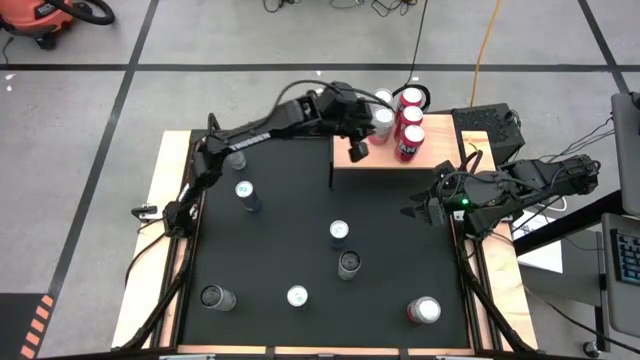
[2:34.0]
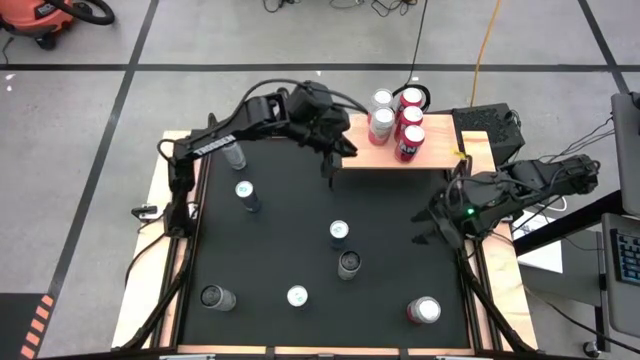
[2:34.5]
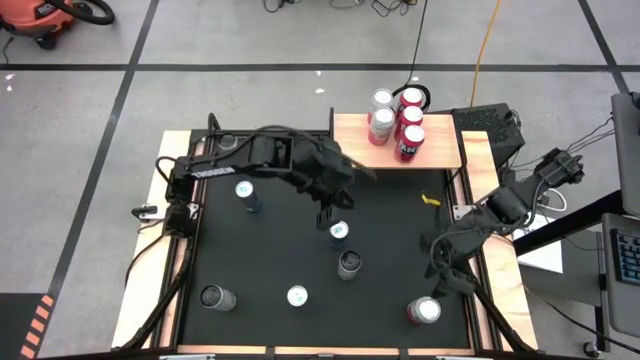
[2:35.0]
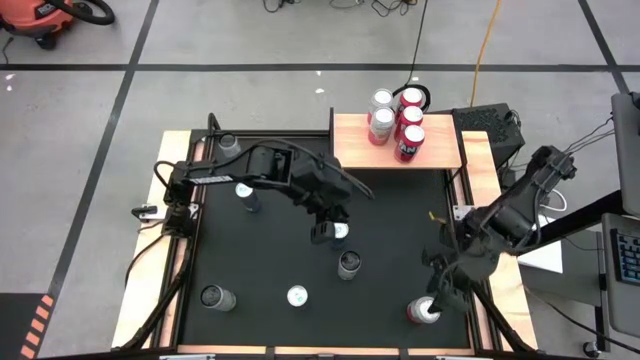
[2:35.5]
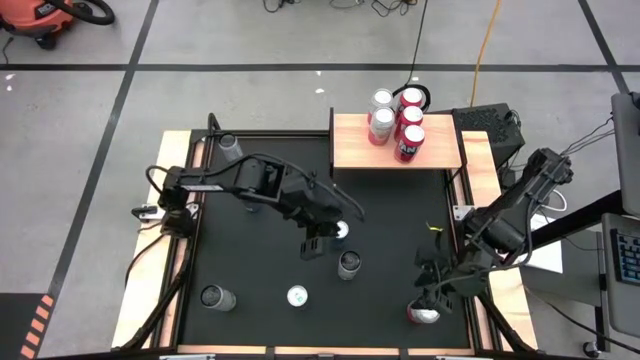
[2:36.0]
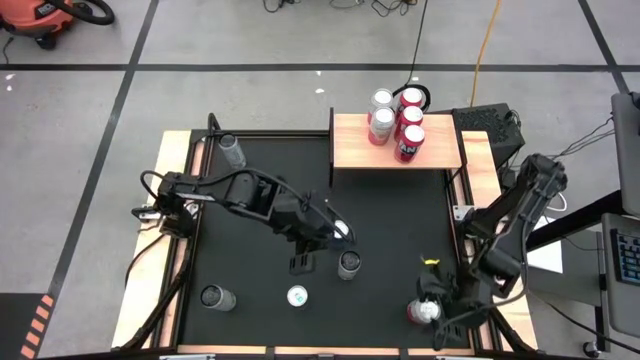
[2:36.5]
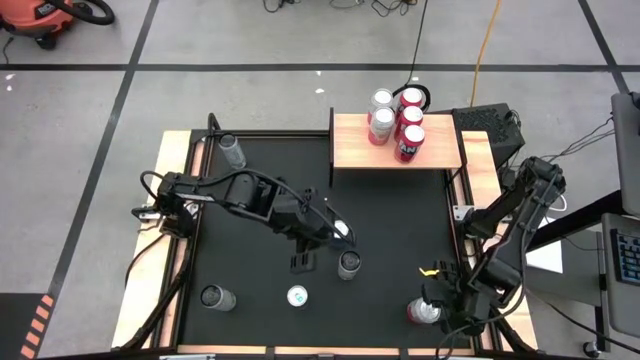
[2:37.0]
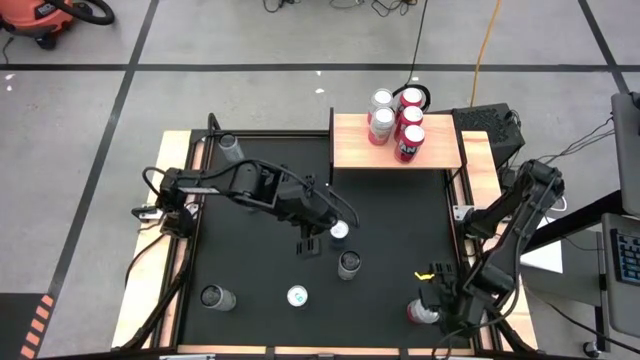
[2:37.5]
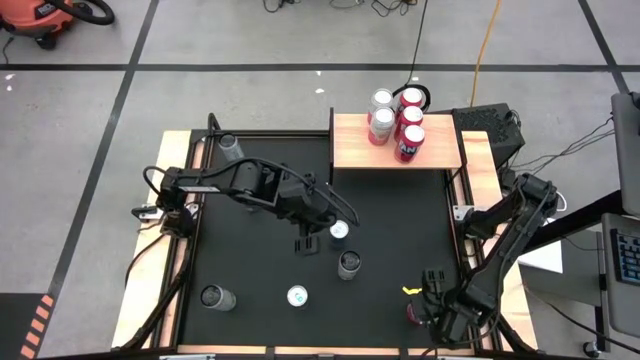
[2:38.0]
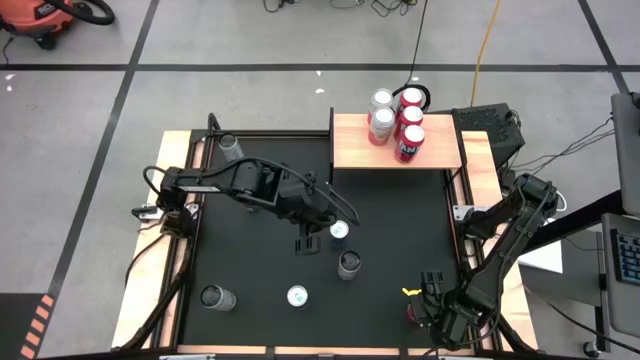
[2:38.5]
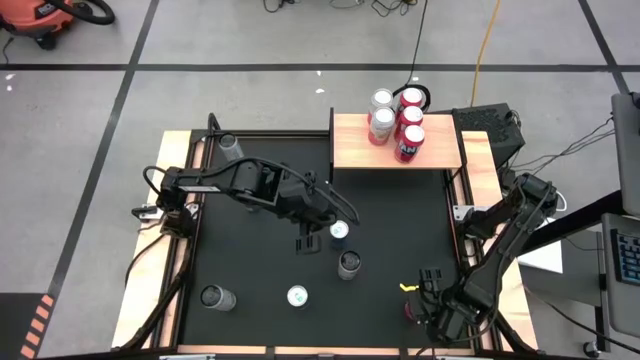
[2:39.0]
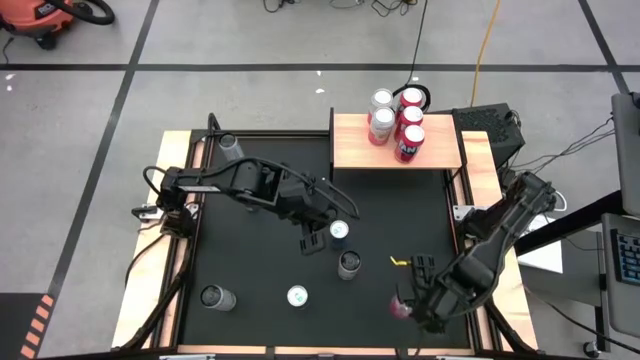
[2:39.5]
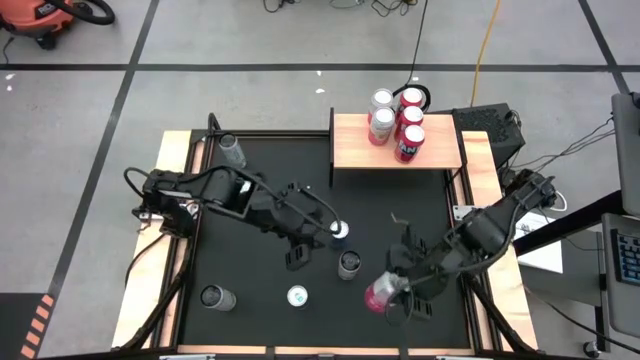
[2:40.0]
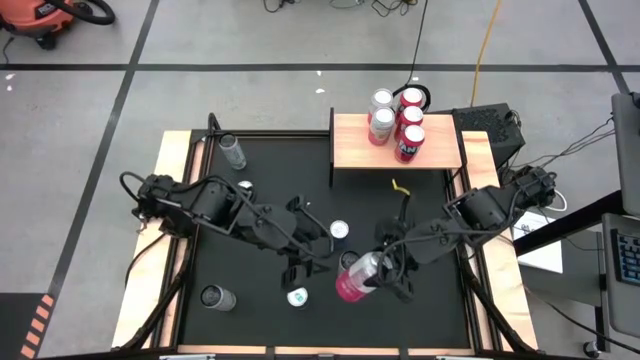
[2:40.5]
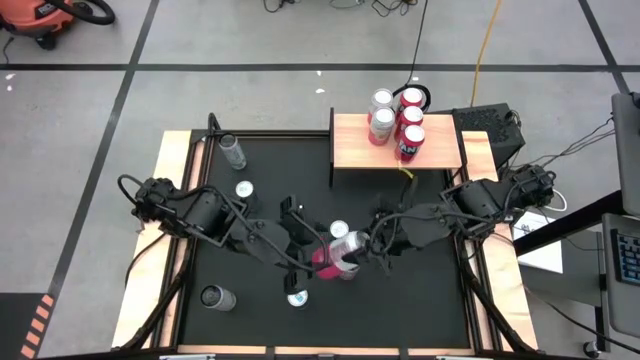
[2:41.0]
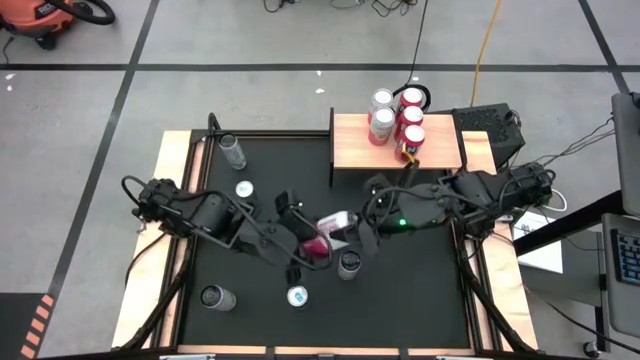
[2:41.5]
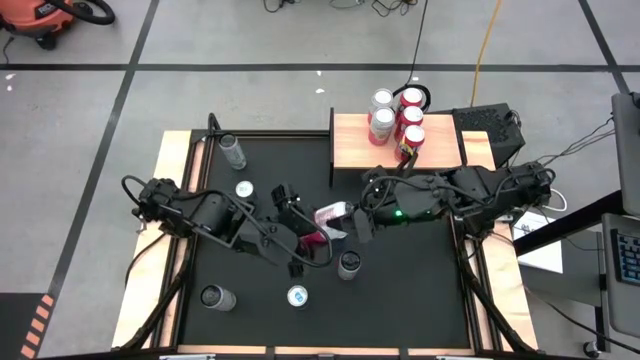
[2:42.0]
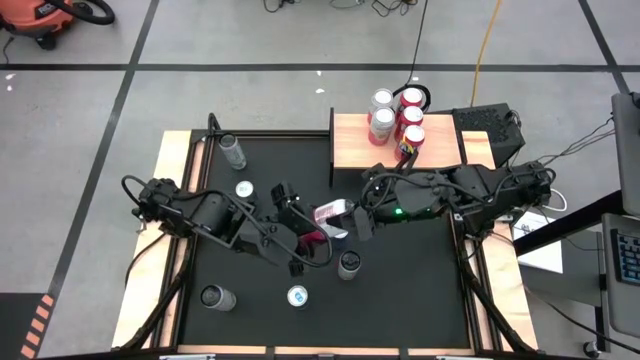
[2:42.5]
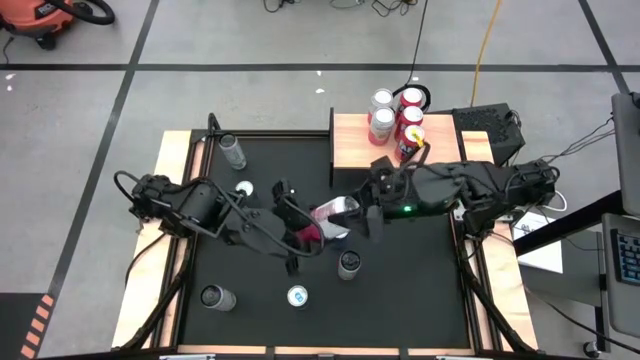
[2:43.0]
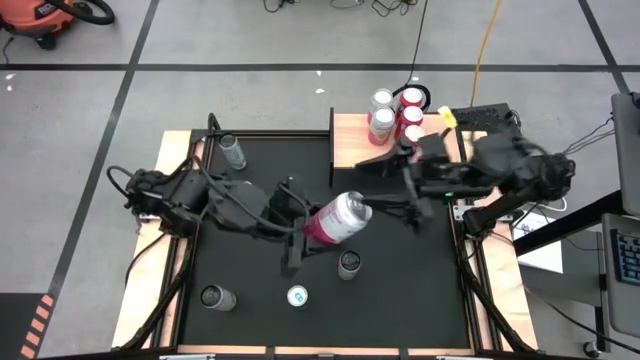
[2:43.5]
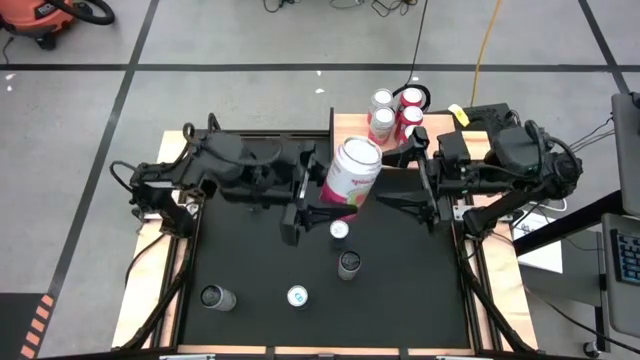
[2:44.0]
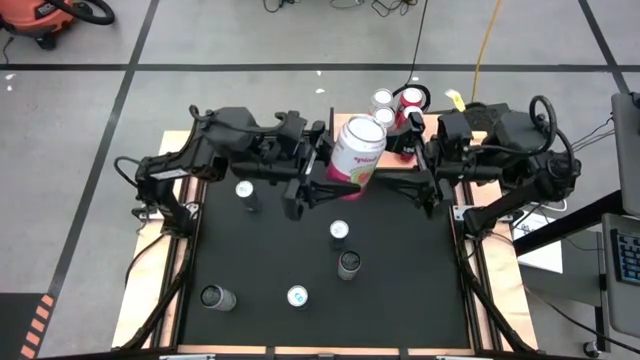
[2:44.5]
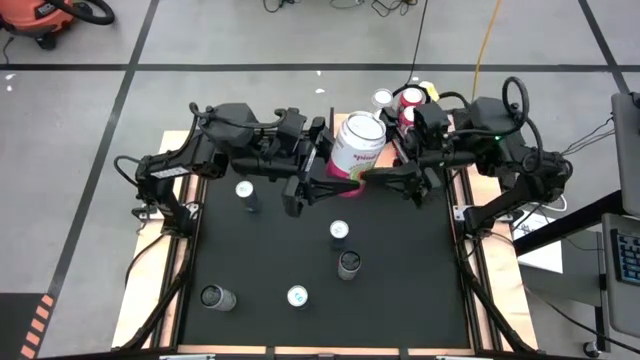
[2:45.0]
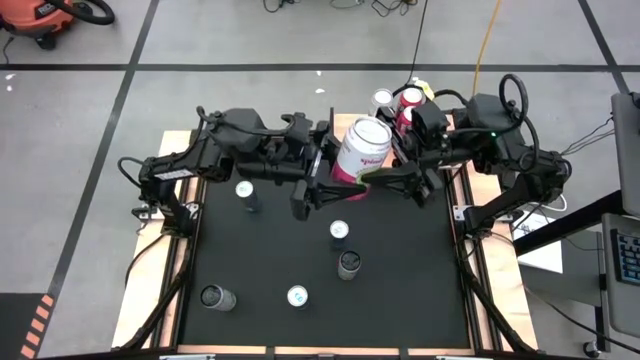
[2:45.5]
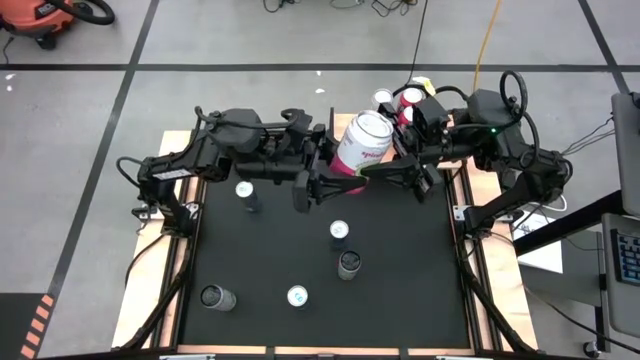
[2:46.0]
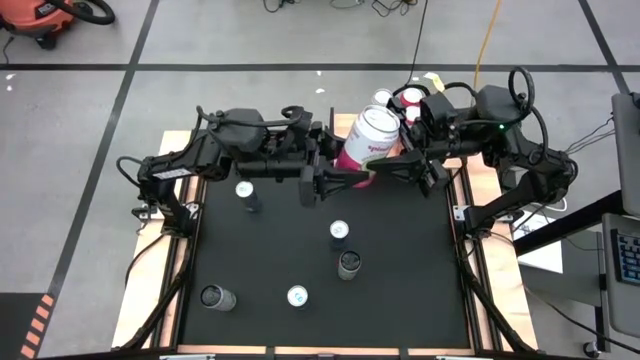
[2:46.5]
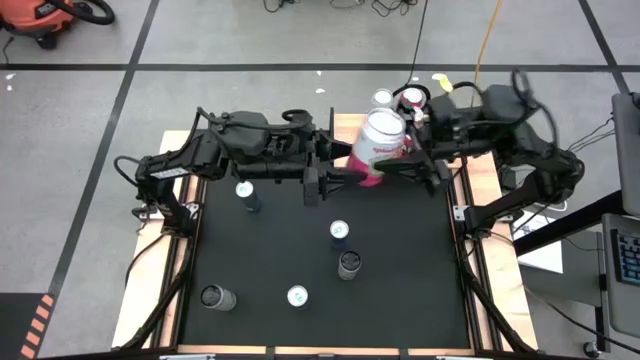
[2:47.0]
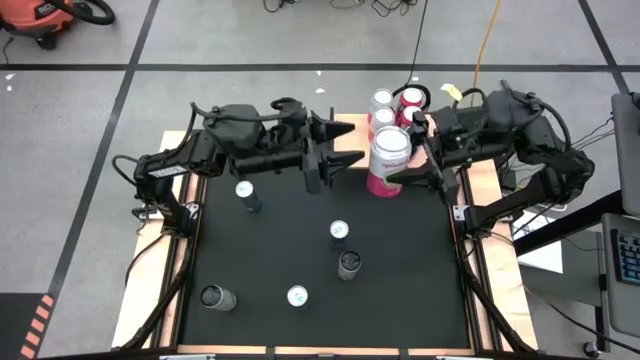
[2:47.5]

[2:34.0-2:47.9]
Task: Place canned beverage on shelf
Put the pink white soda can on the shelf aligned with the other pink white soda cans

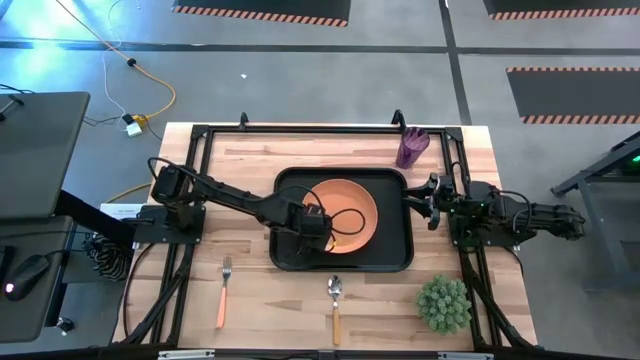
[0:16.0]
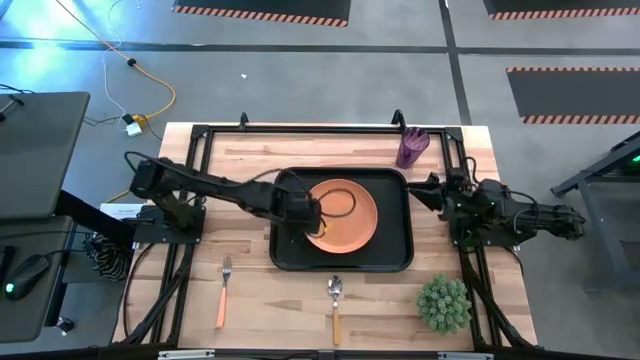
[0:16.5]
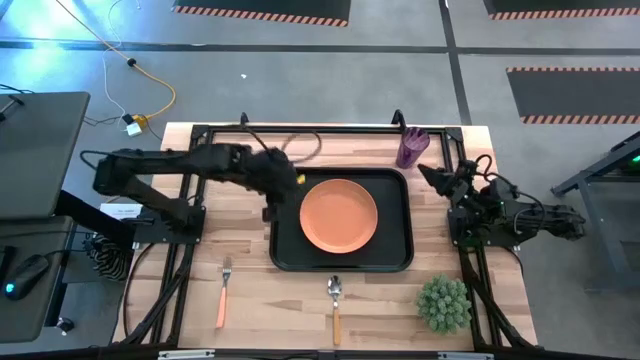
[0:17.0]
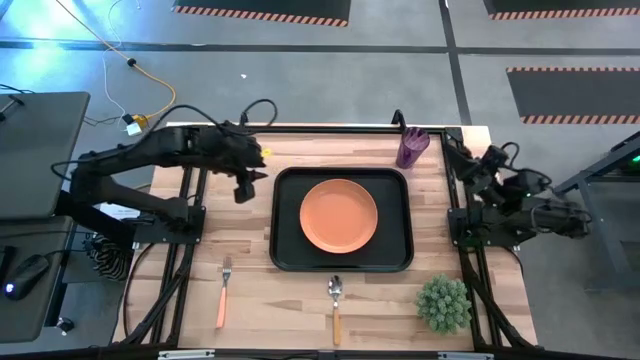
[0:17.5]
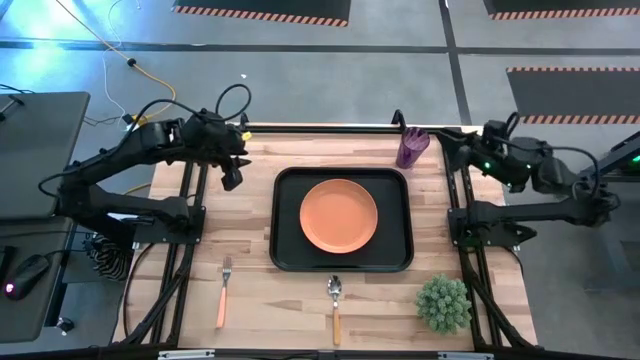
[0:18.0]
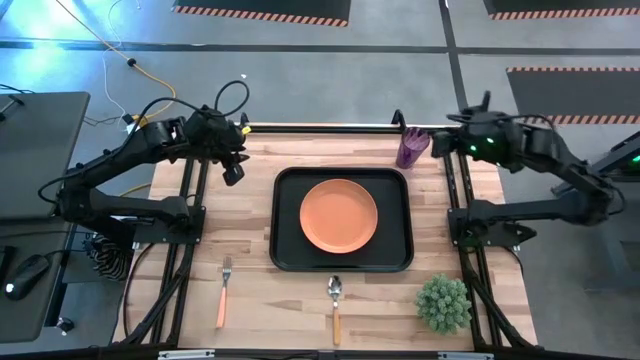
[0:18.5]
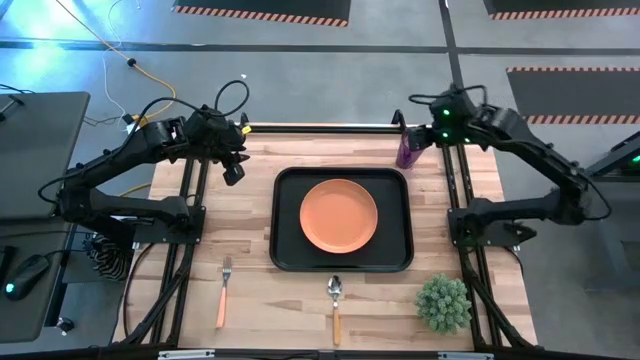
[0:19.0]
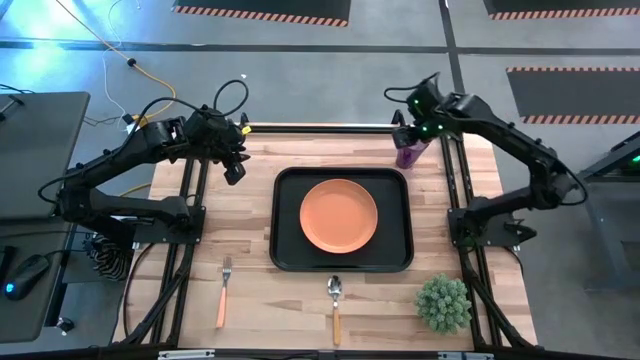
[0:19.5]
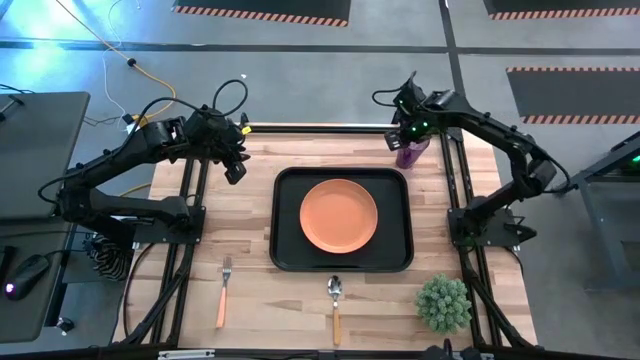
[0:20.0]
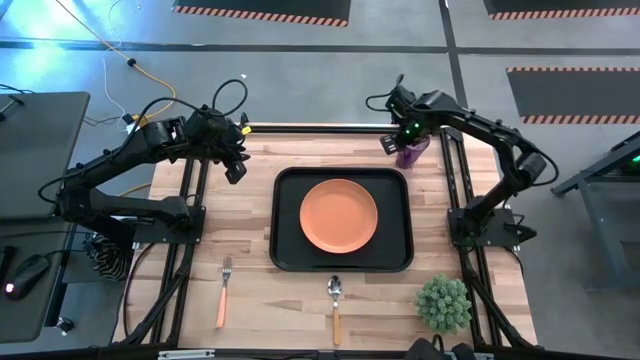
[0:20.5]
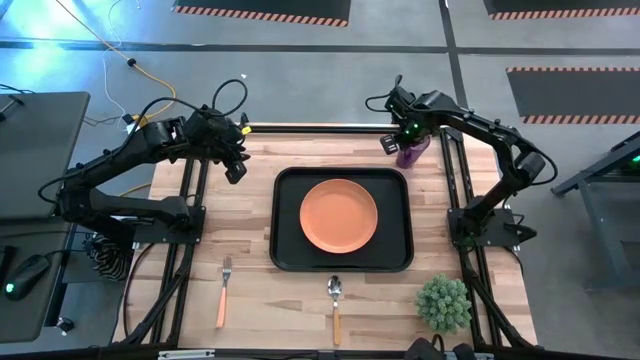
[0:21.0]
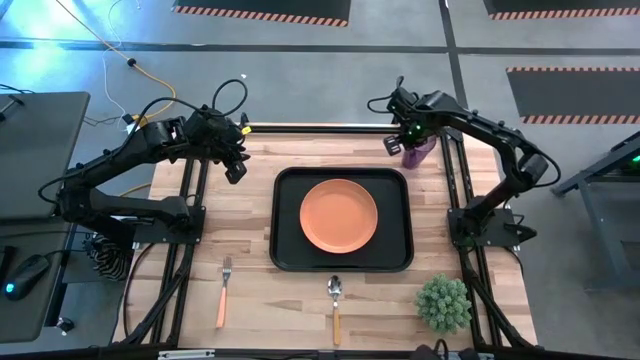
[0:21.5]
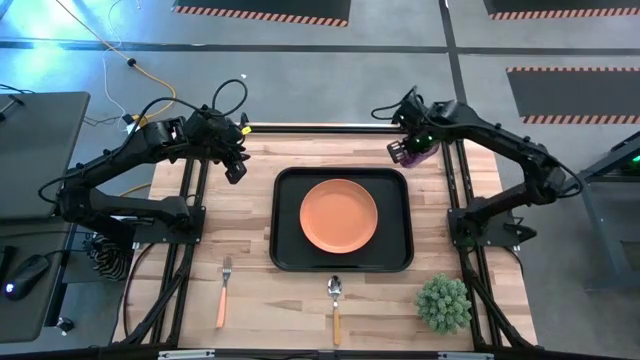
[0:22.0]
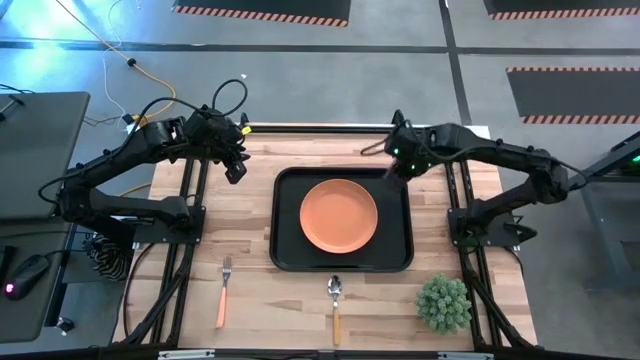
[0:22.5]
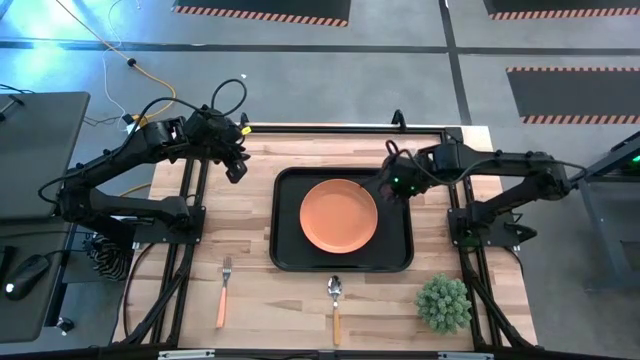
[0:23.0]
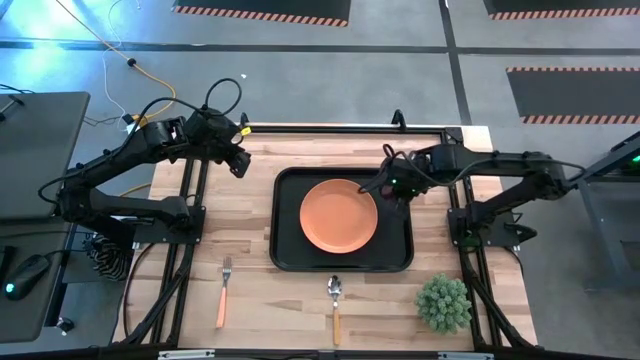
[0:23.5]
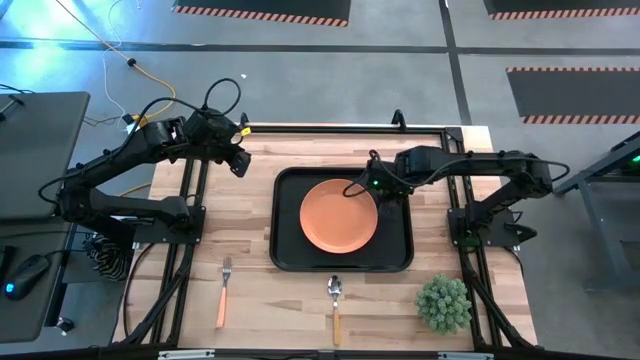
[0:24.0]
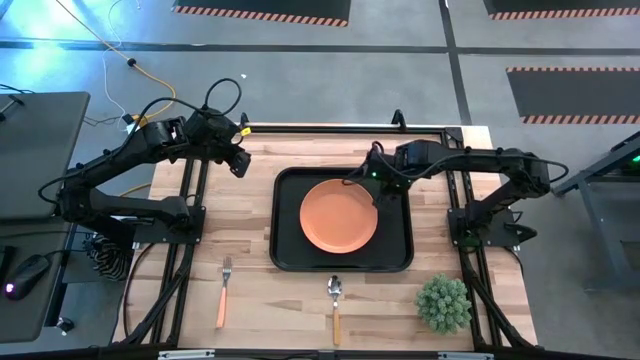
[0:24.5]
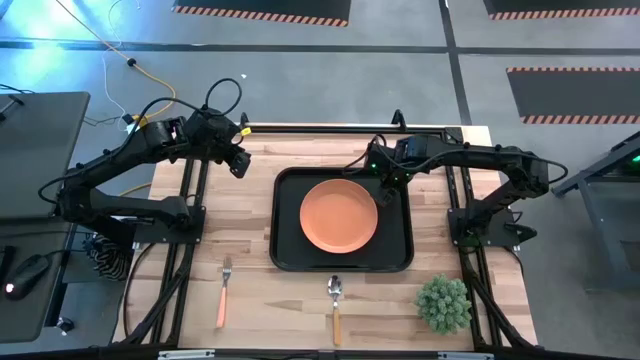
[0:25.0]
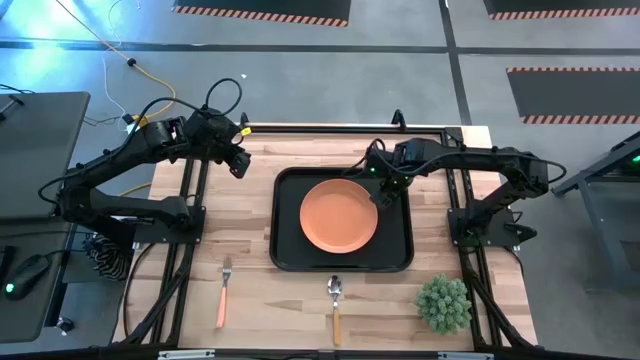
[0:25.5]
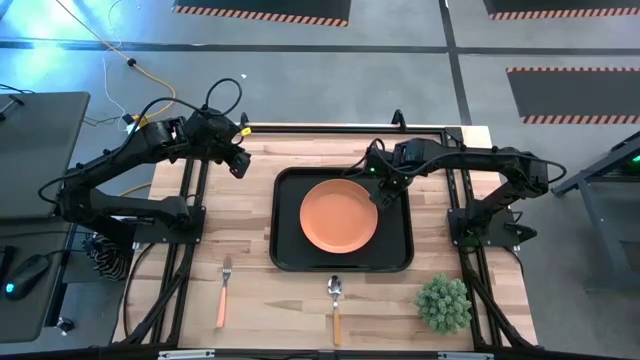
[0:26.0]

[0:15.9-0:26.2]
Task: Pick and place plate/cup/fork/spoon on tray
Put the purple cup on the black tray to the top right of the orange plate
